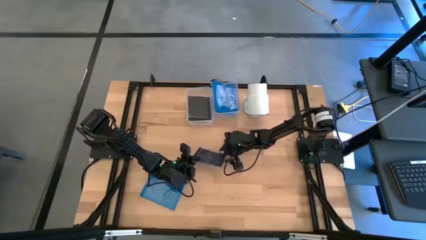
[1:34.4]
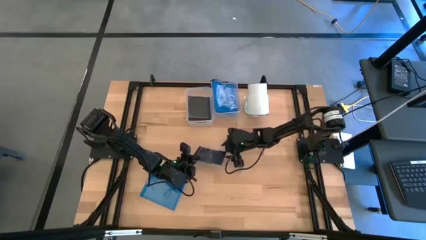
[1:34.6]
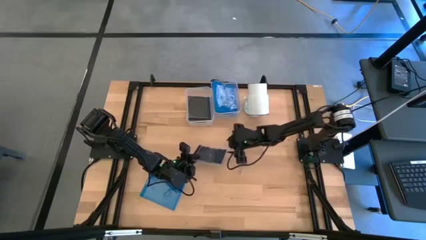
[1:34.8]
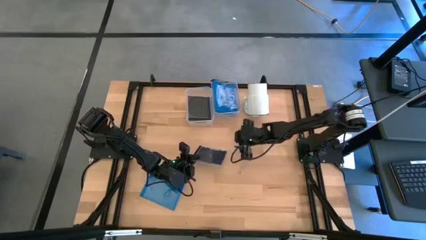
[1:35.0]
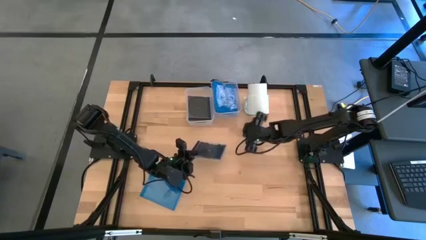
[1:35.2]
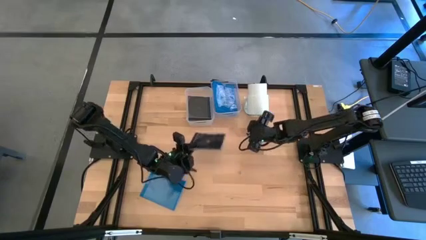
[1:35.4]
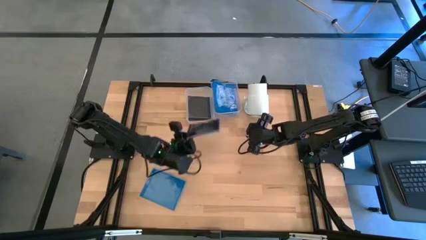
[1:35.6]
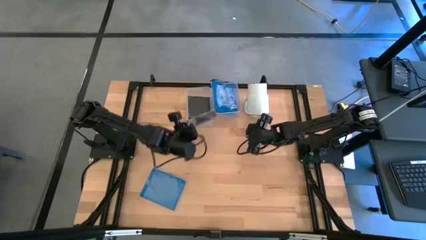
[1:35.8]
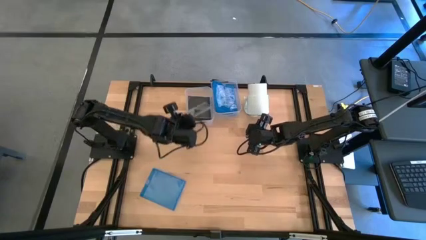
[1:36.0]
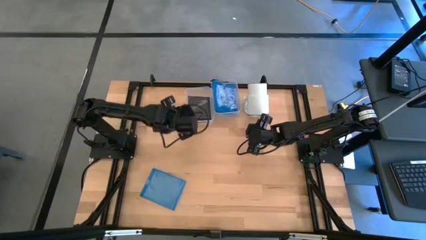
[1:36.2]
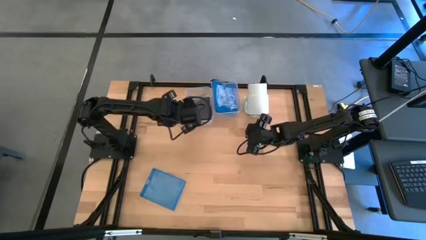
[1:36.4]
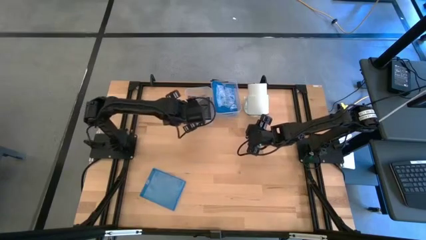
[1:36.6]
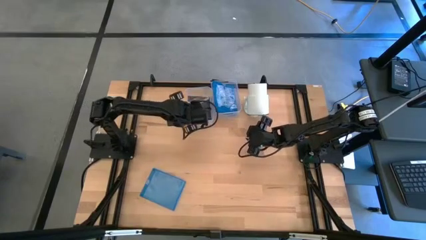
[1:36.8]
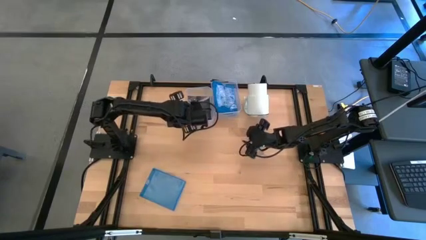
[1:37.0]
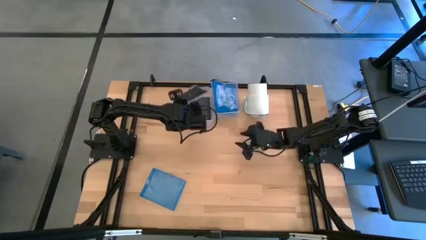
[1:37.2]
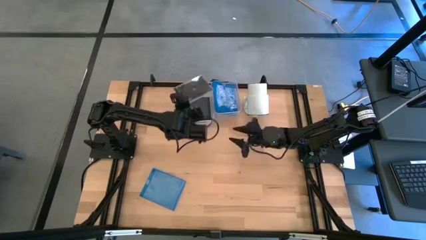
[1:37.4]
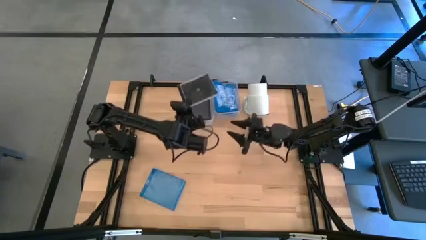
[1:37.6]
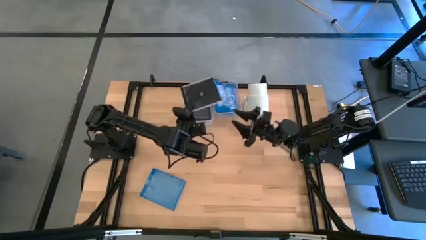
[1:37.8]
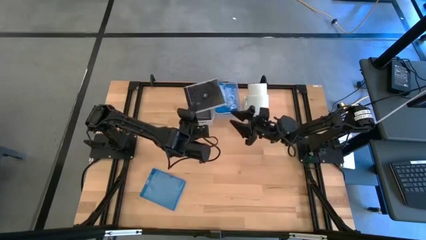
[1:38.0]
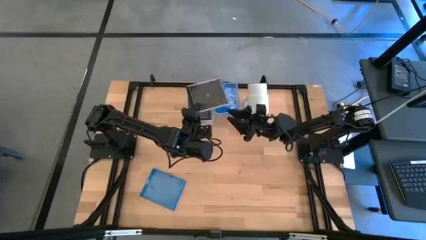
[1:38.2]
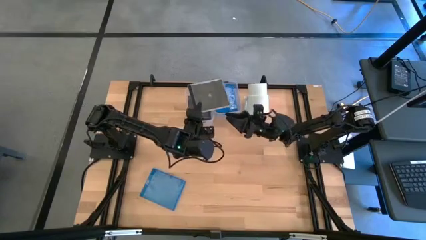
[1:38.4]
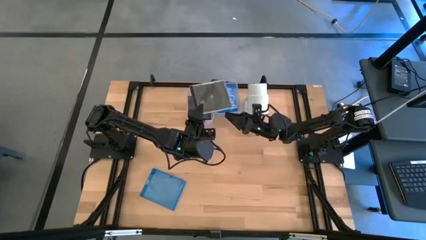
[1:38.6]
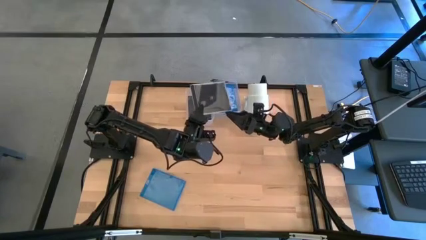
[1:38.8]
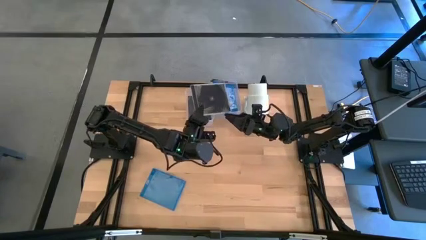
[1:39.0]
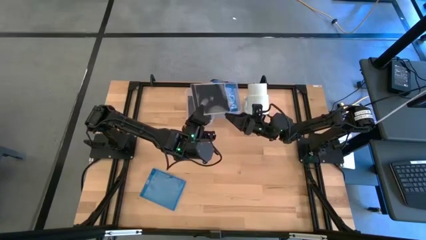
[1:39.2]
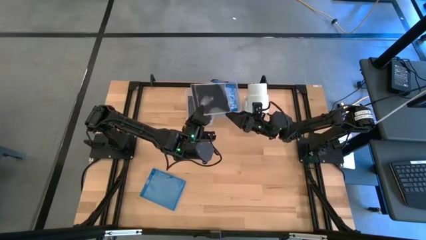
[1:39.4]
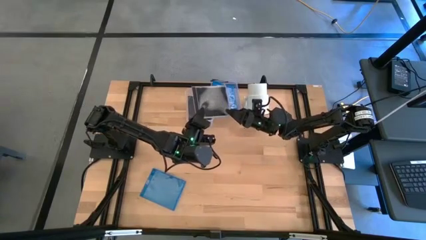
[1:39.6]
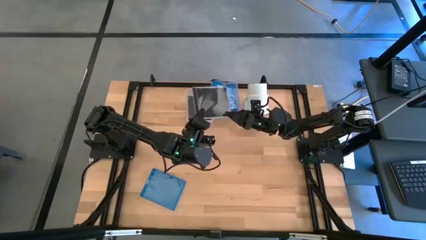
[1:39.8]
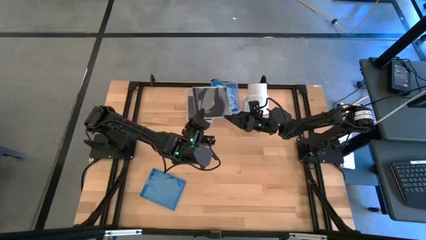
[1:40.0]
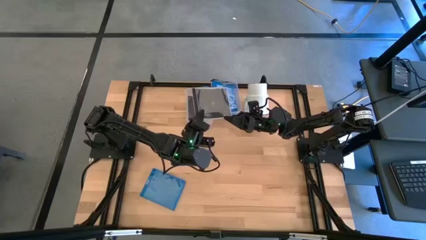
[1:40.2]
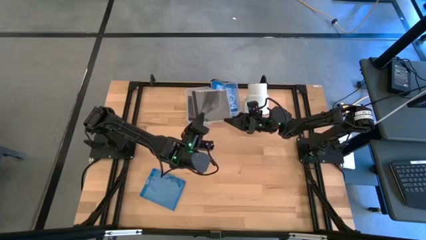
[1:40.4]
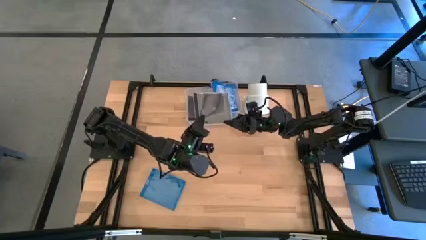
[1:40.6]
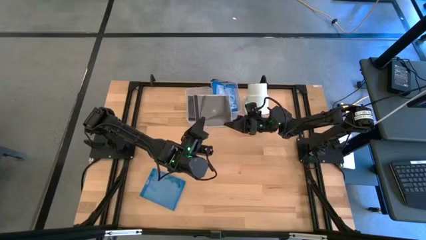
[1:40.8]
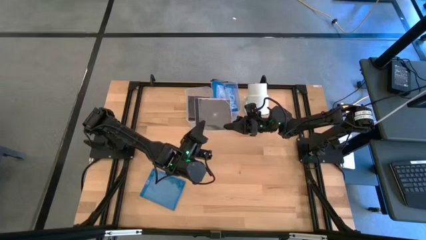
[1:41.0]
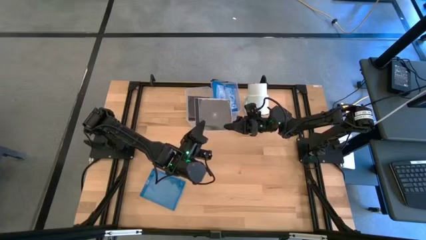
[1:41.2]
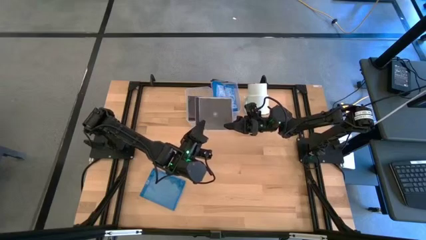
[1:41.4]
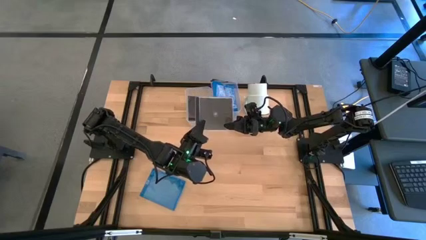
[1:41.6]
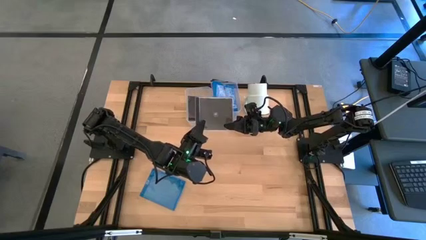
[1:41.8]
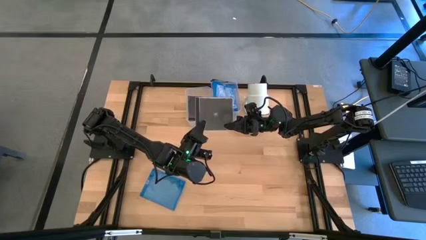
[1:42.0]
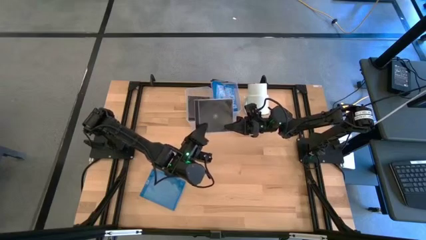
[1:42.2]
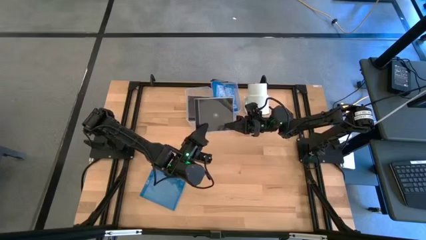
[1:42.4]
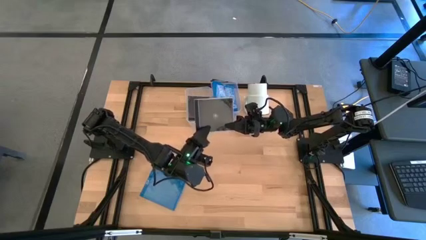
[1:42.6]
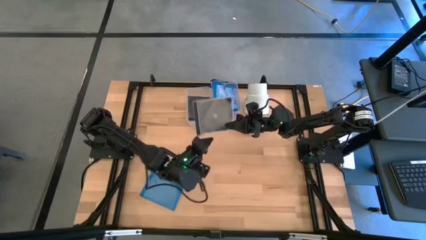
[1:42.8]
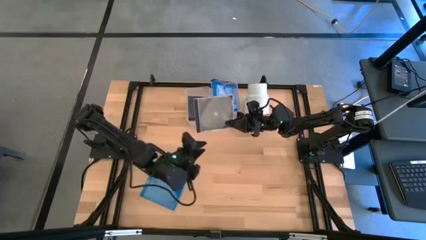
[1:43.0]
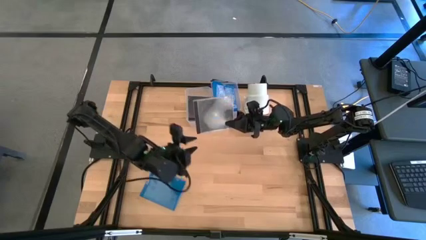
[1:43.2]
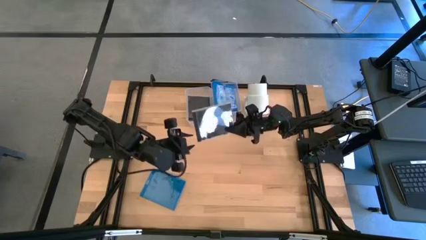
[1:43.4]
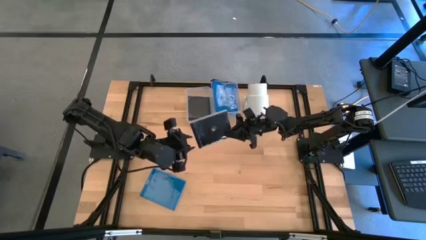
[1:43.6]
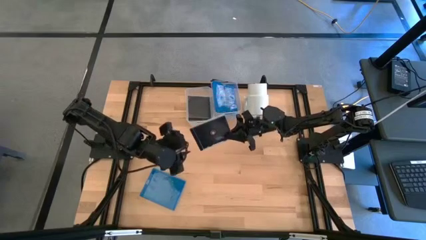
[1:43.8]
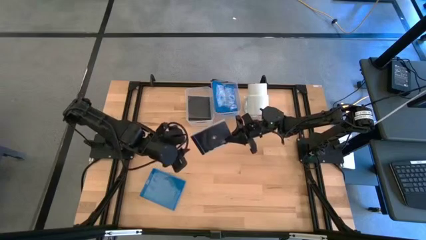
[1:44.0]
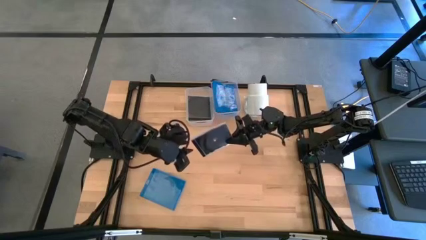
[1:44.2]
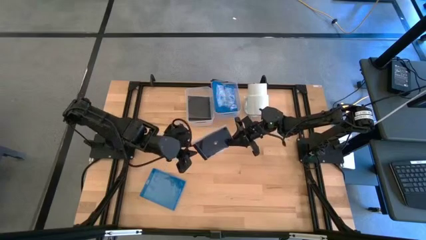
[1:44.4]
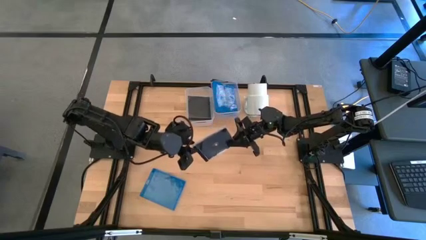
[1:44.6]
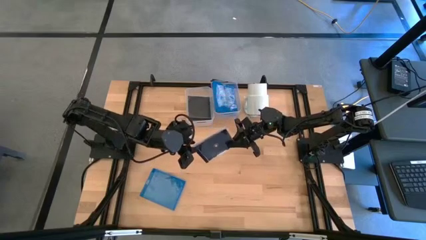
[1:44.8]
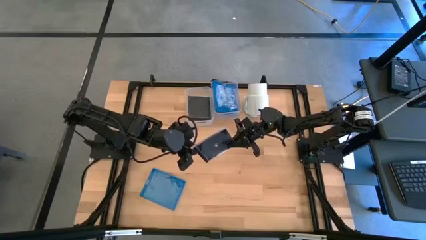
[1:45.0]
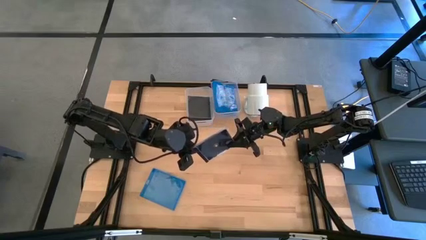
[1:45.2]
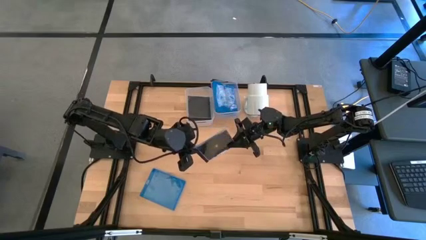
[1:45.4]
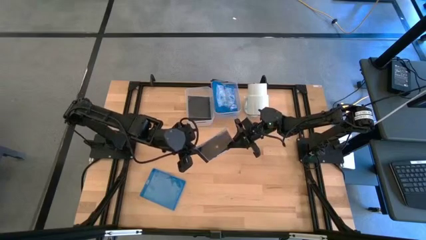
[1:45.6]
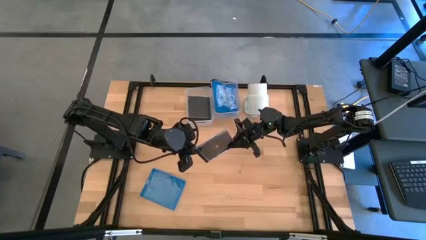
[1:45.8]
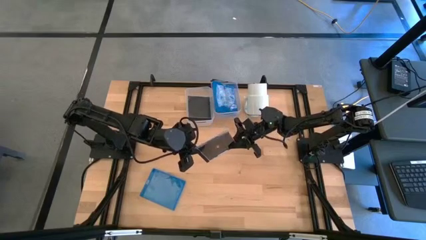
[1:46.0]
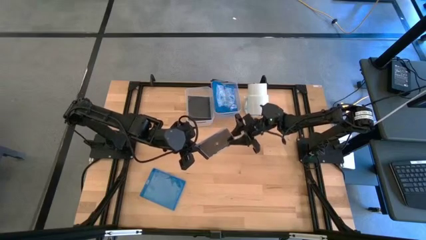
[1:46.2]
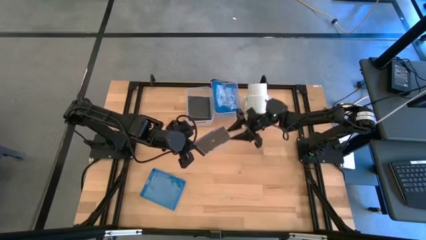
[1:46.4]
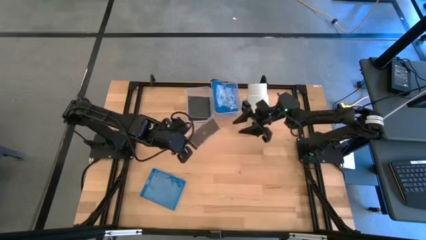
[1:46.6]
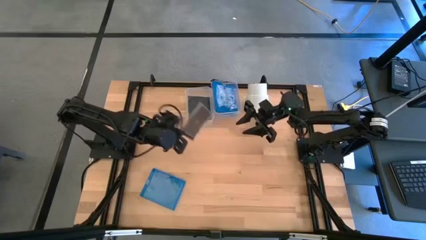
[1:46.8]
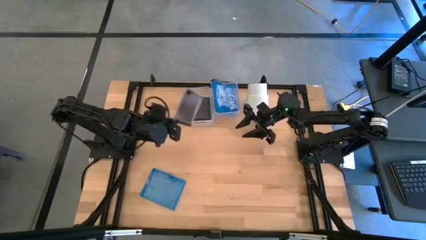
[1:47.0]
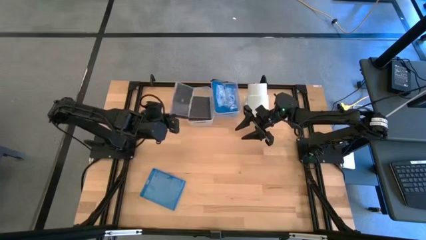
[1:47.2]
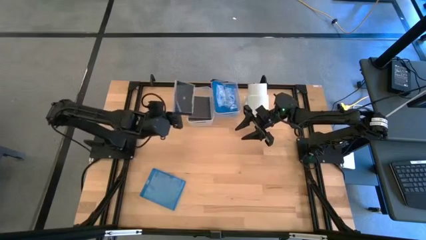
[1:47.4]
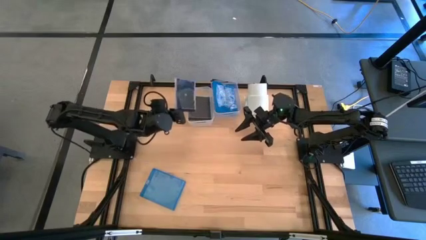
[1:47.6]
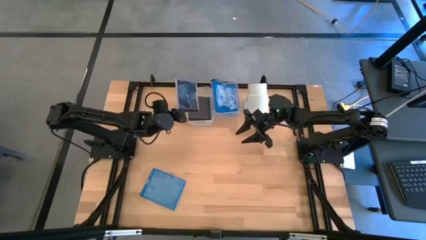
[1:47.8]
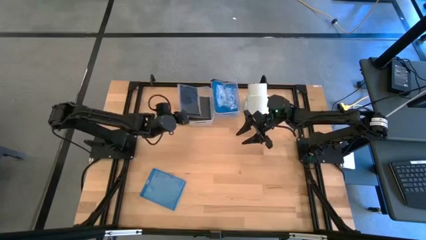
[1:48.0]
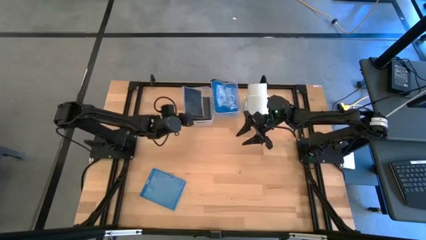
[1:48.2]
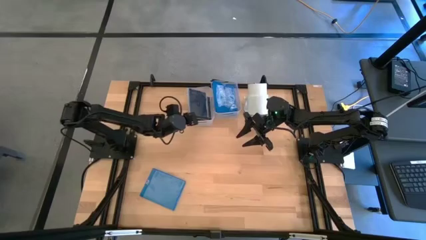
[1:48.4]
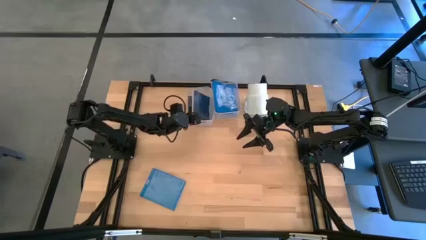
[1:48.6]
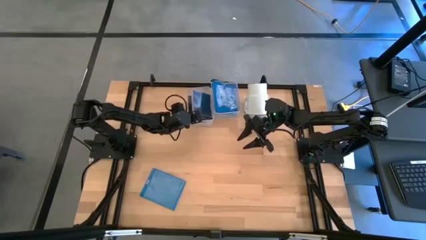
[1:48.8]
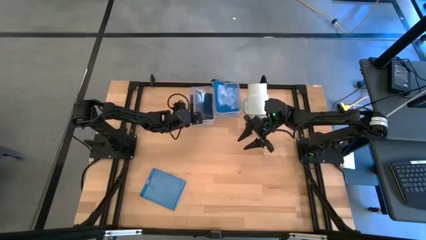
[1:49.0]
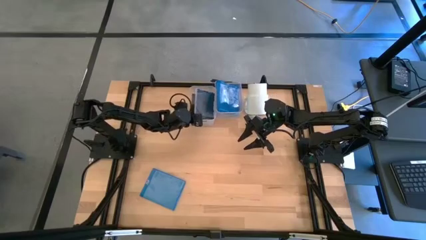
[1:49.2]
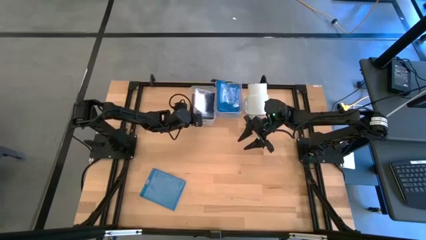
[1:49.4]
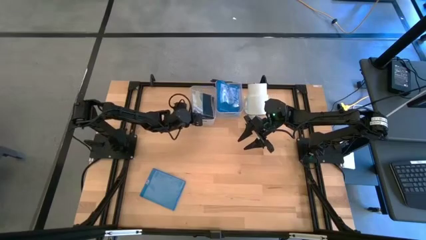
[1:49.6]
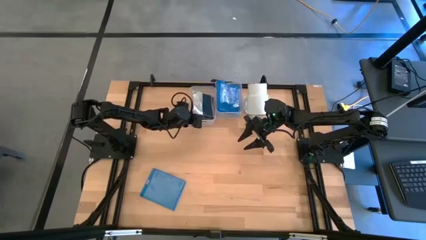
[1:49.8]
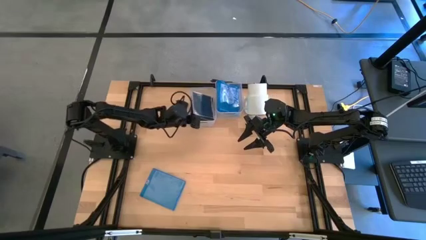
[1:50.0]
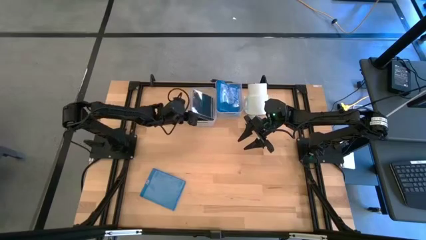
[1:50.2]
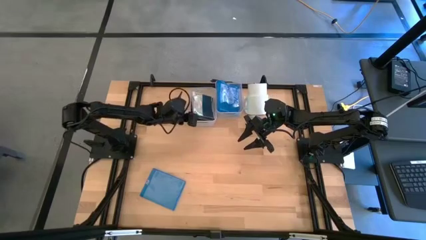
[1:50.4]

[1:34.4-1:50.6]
Task: Pick & place jewel cases by type
Put the black CD Case into the left transparent bin
